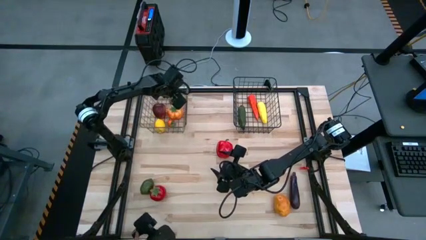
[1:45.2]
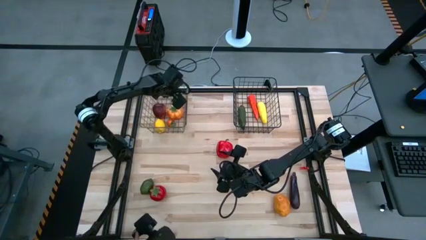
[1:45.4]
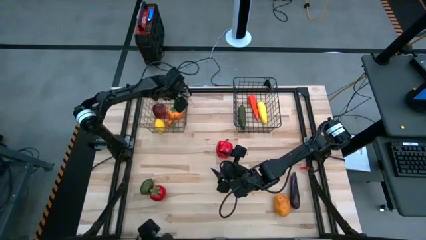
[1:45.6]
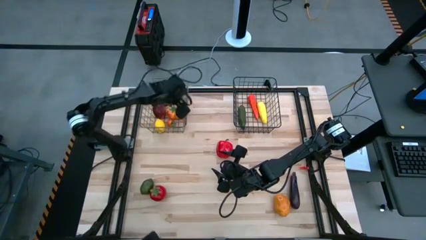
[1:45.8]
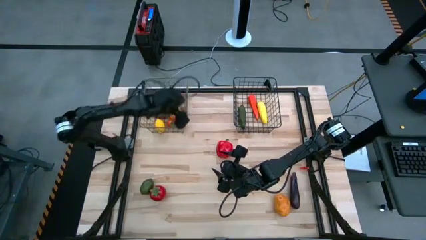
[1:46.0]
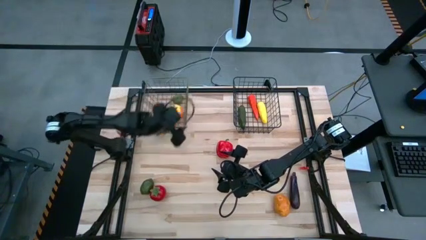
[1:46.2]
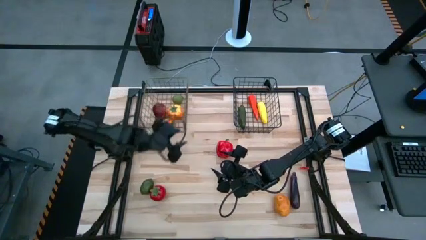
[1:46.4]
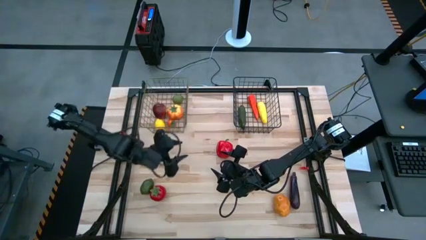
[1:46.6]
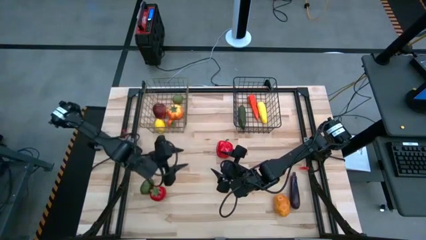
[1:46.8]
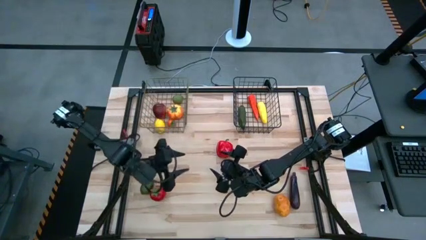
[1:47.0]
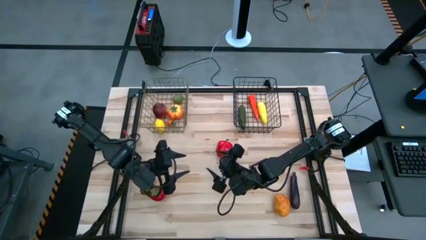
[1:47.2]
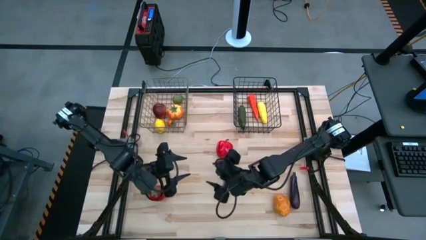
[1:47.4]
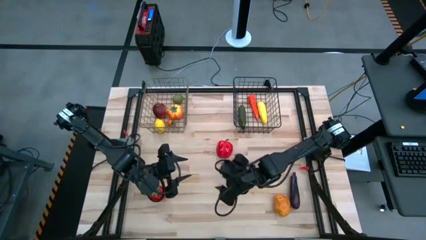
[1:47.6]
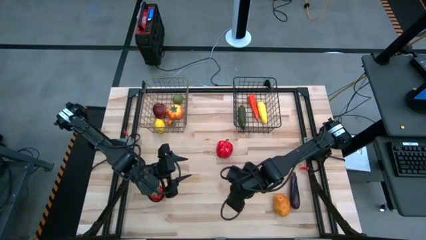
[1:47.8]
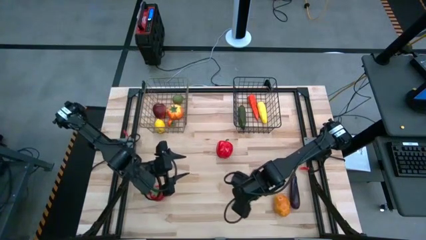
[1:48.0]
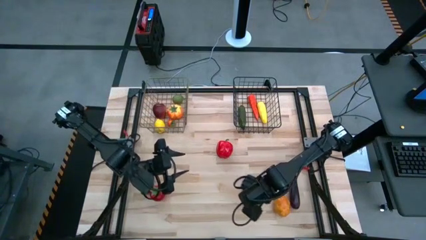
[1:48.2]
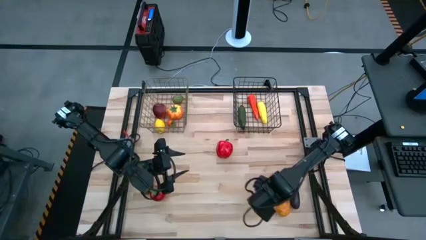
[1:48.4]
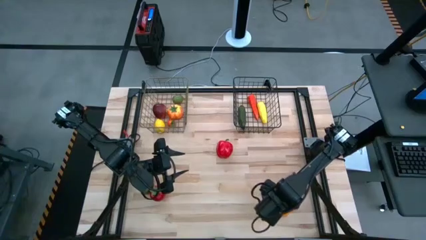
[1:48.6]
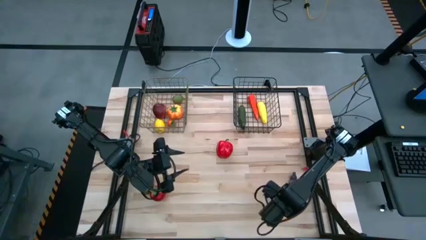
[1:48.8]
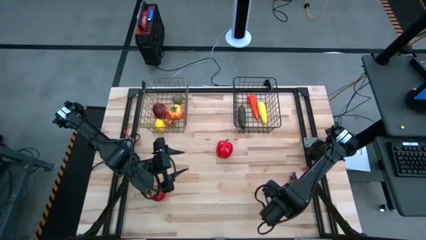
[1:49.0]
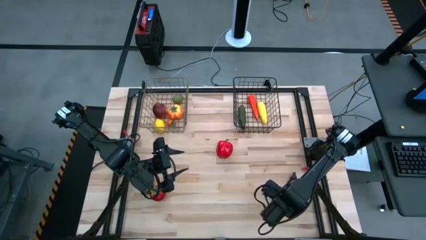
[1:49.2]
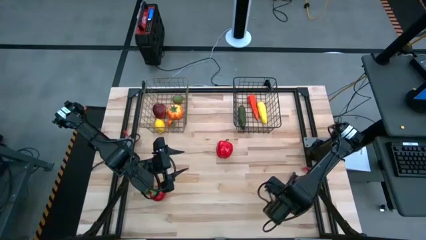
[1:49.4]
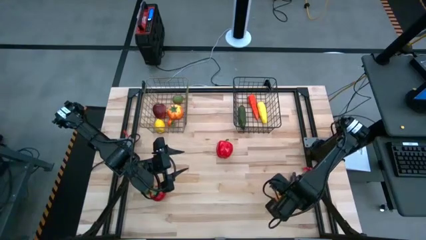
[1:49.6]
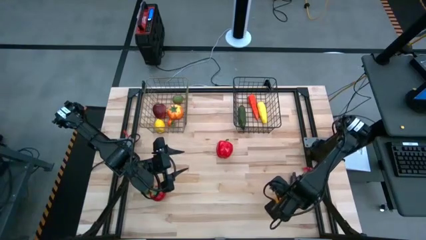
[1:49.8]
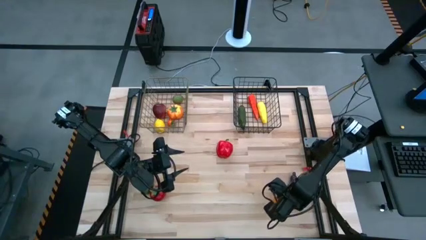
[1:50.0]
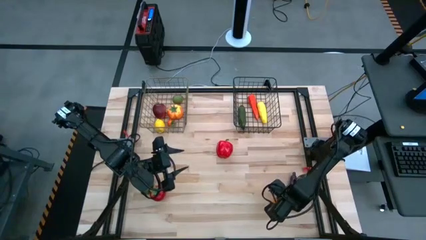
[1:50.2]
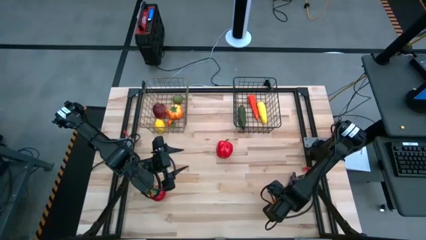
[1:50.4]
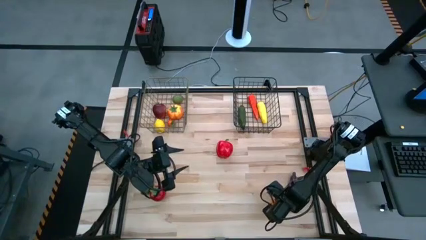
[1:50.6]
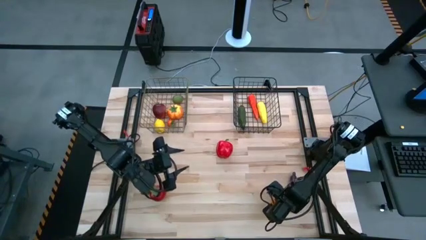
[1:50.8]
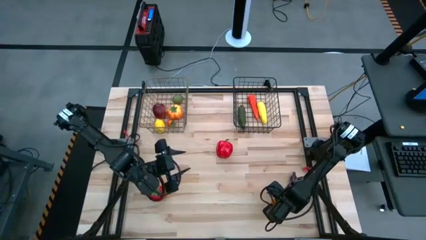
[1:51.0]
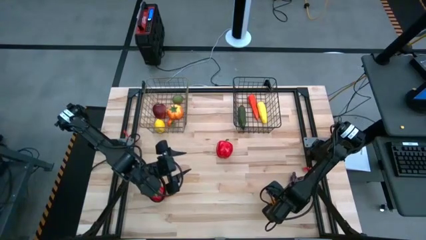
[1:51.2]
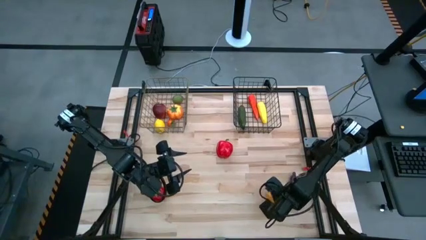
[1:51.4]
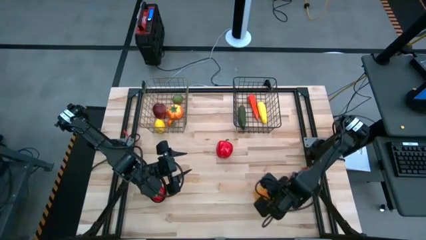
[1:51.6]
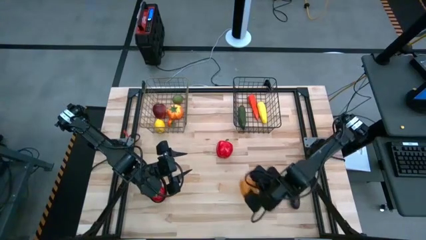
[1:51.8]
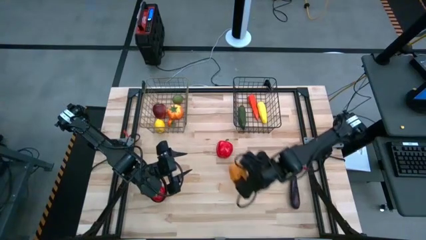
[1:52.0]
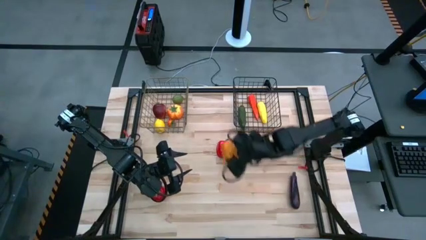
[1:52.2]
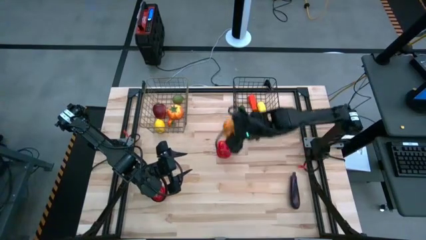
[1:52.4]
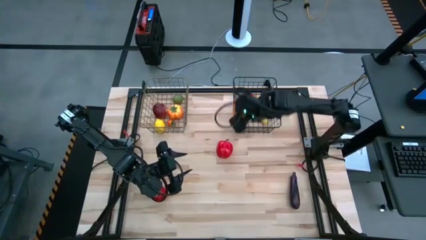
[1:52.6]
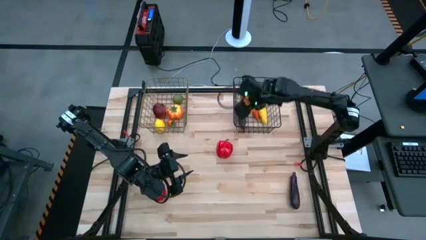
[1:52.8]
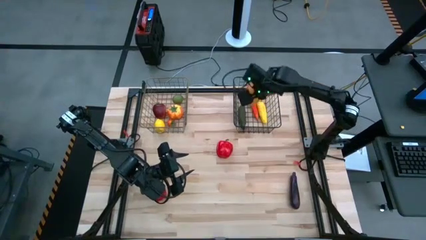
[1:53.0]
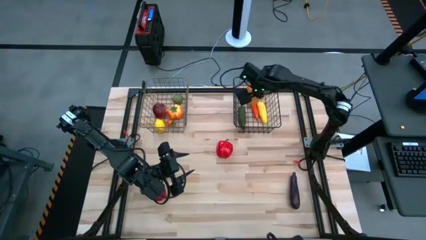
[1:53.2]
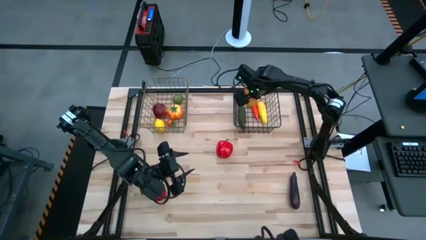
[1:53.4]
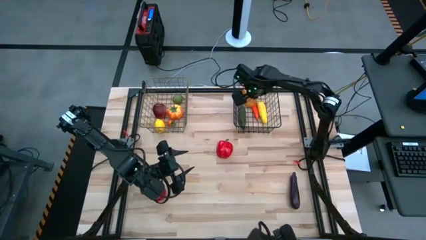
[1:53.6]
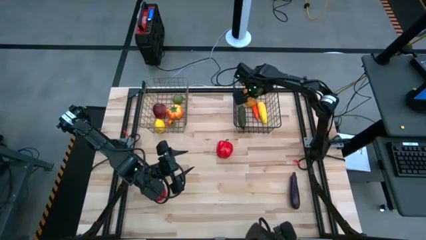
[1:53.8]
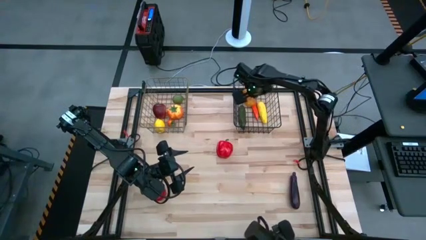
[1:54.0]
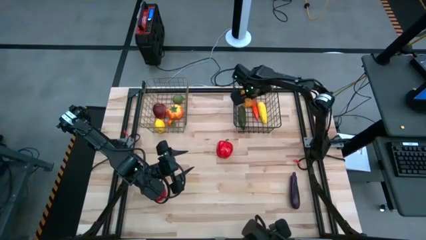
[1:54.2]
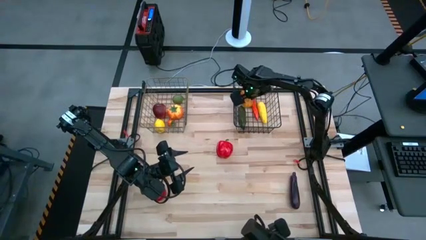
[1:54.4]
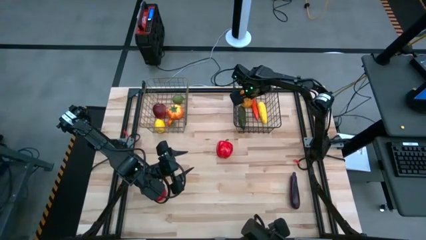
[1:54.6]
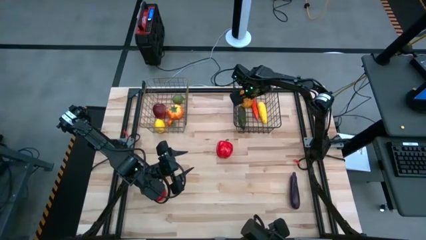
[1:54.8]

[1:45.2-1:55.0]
Task: Sort produce into baskets
Put the brown potato into the right black wire basket

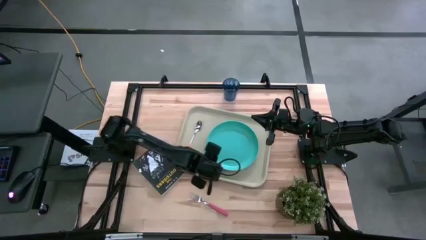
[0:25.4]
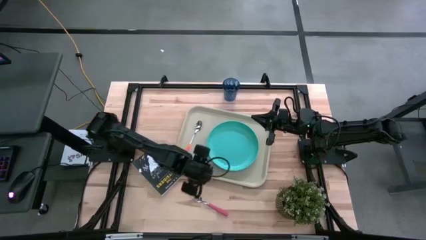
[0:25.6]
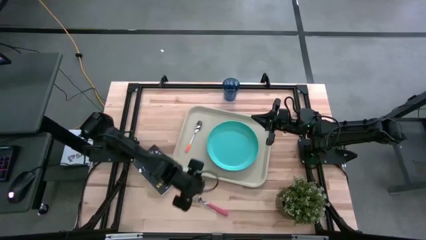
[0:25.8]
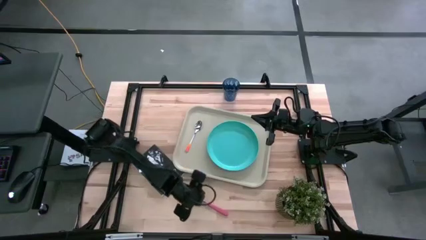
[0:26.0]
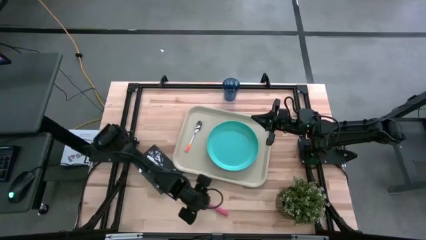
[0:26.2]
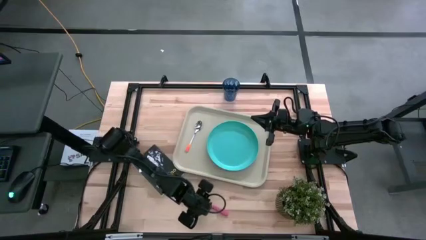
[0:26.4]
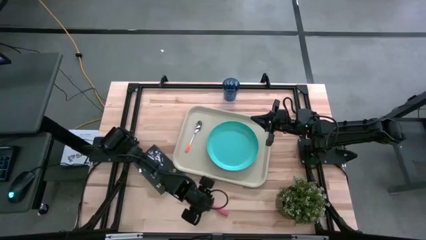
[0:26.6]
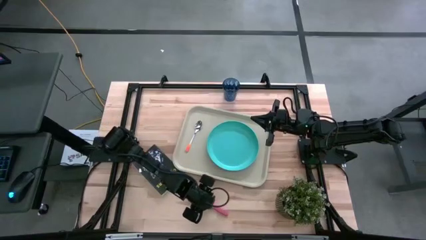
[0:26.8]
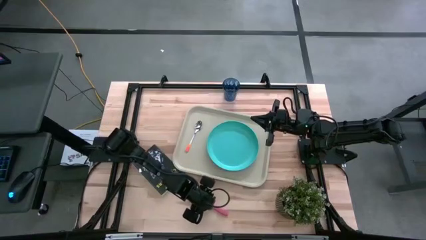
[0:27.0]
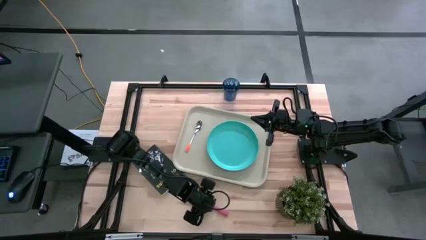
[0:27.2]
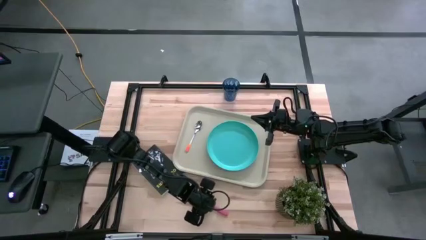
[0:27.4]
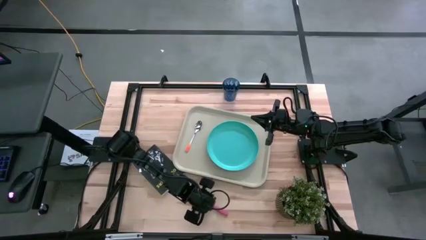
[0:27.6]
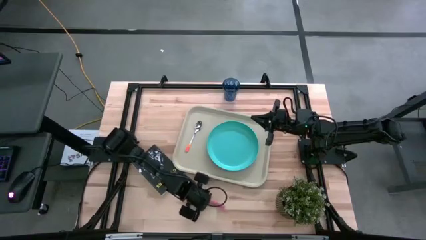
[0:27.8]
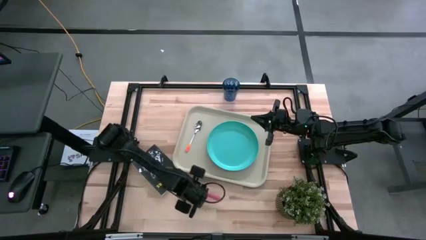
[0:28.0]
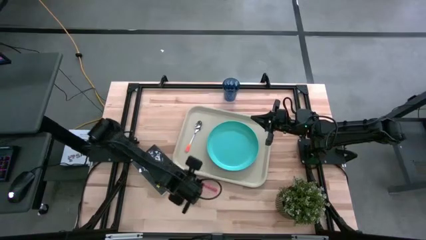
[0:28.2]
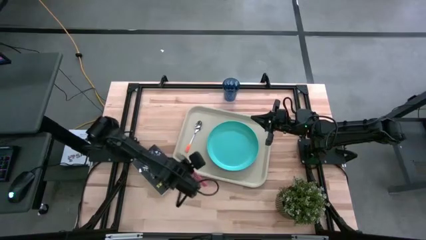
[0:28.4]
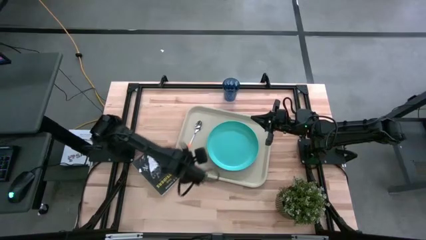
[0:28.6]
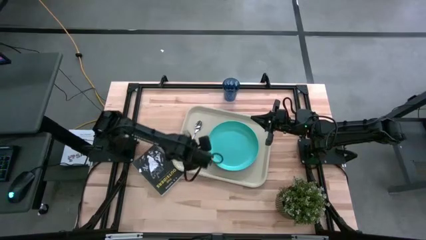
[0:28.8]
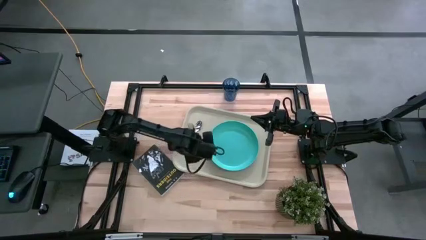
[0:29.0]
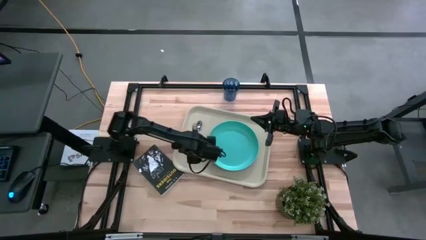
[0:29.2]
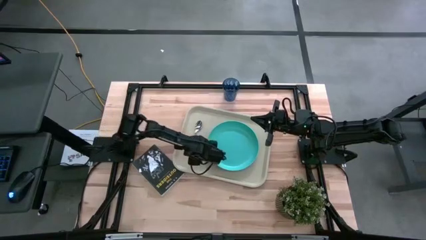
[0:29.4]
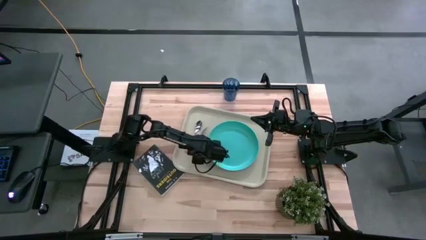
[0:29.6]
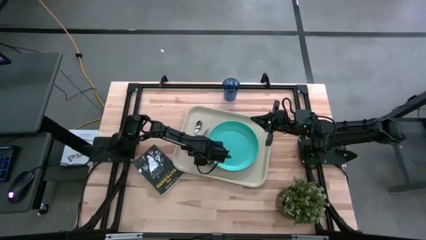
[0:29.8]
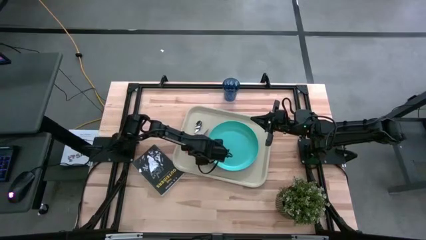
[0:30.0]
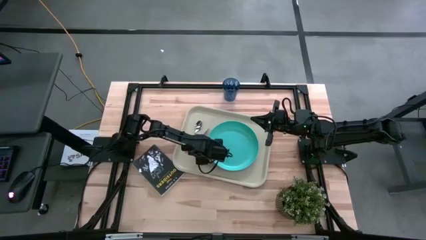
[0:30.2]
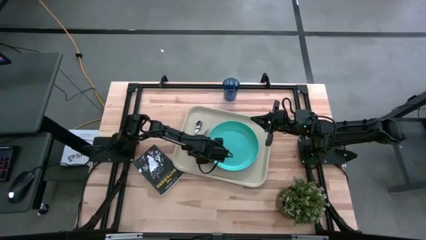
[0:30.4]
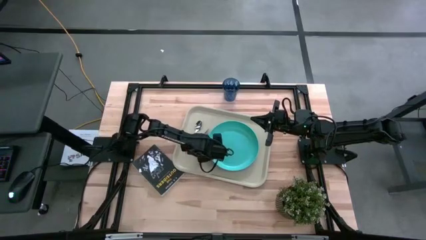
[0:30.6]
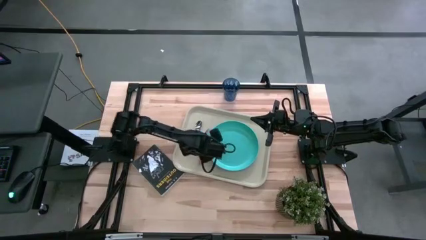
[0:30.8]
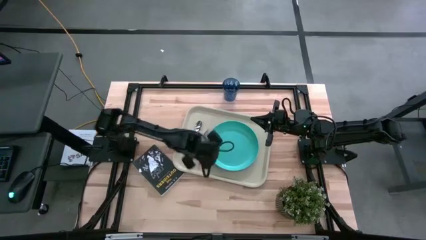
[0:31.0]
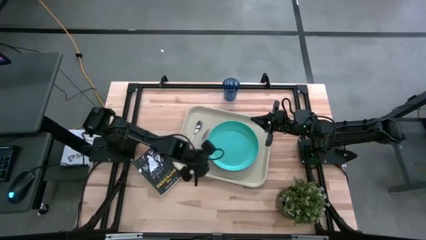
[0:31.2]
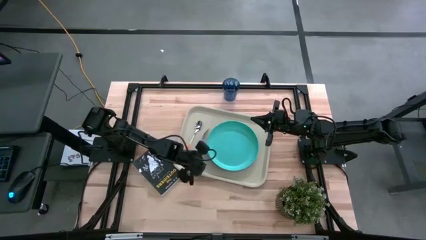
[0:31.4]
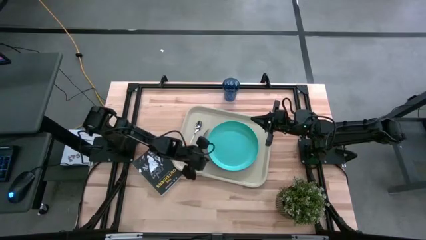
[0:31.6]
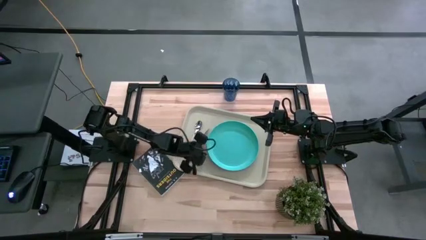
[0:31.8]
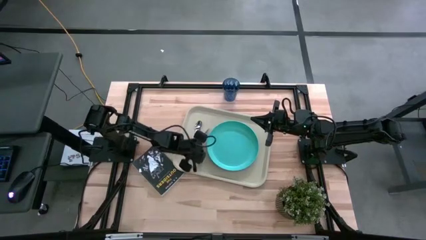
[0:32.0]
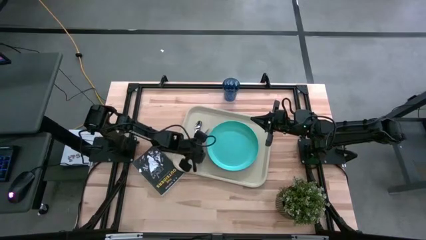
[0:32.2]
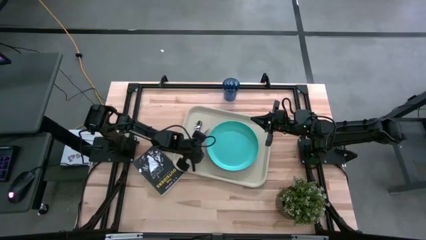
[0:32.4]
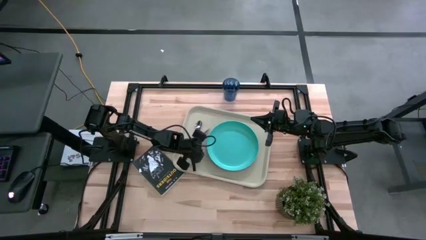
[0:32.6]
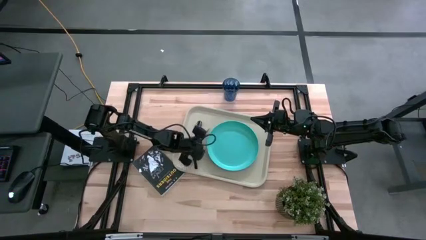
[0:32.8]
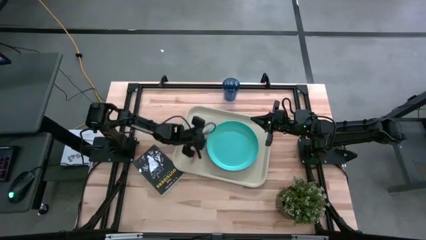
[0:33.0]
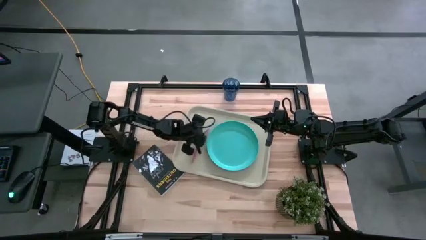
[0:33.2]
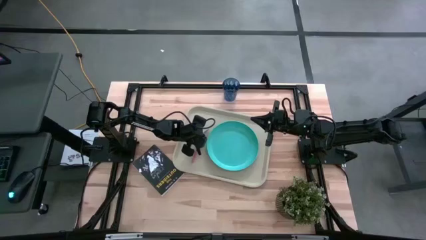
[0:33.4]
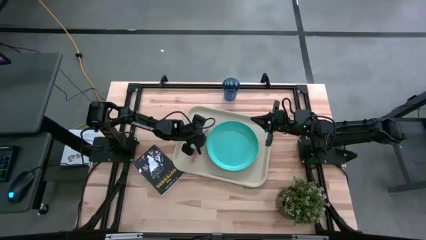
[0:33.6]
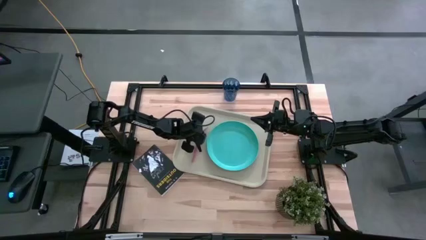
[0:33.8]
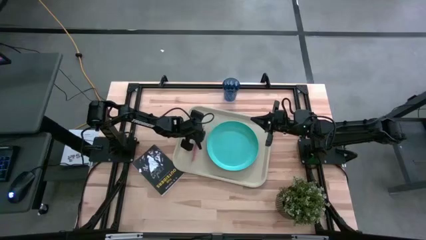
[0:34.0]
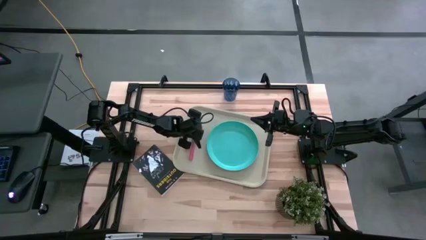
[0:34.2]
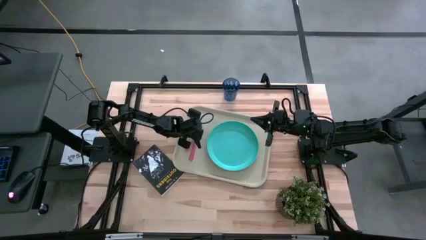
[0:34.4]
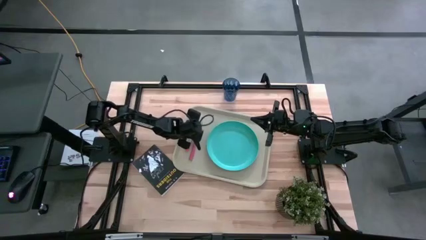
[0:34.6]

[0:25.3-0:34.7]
Task: Pick and place plate/cup/fork/spoon on tray
Put the pink fork on the left side of the green plate
